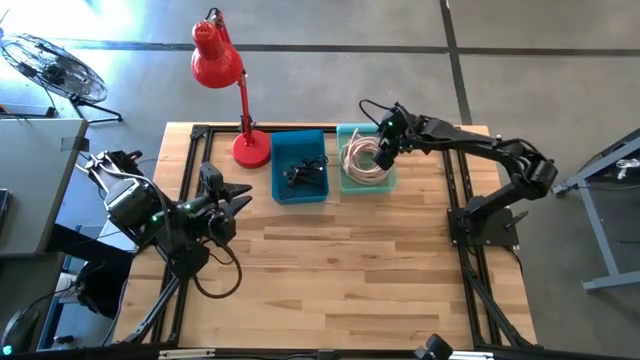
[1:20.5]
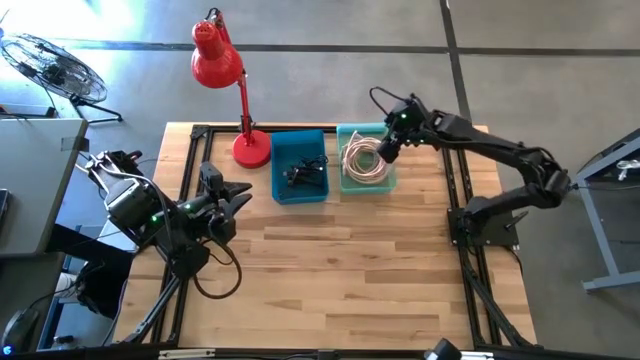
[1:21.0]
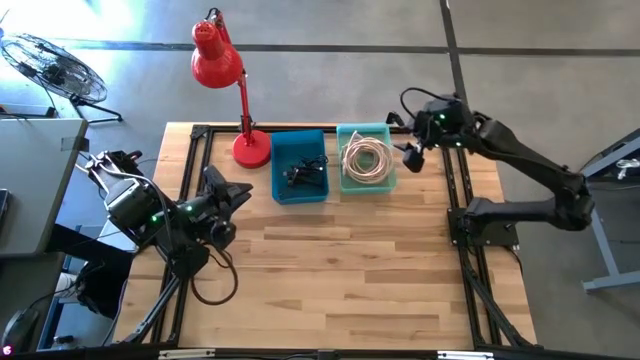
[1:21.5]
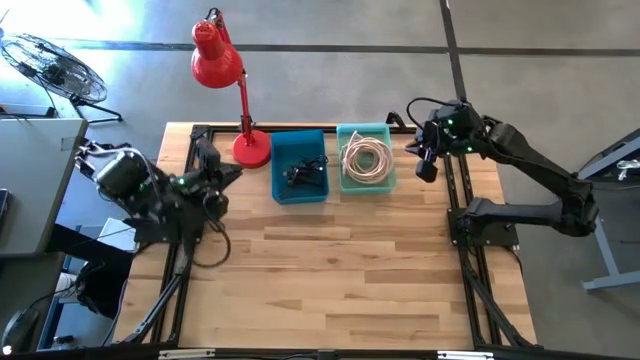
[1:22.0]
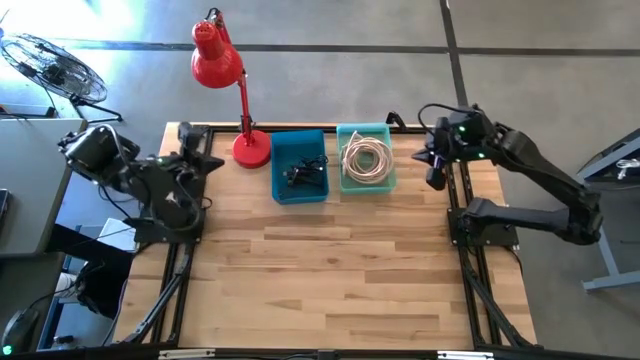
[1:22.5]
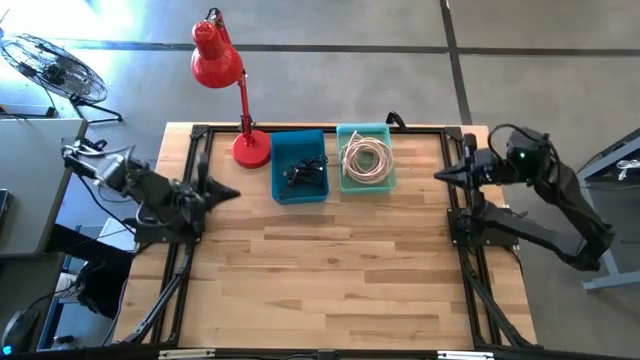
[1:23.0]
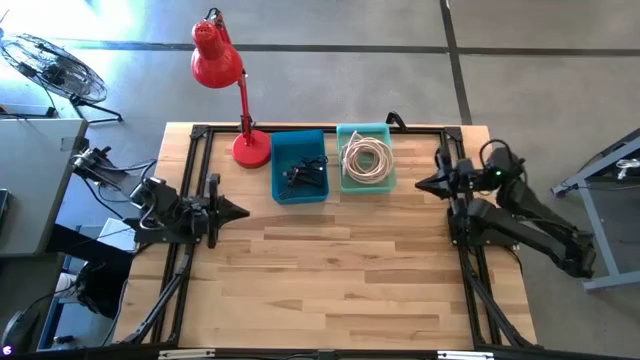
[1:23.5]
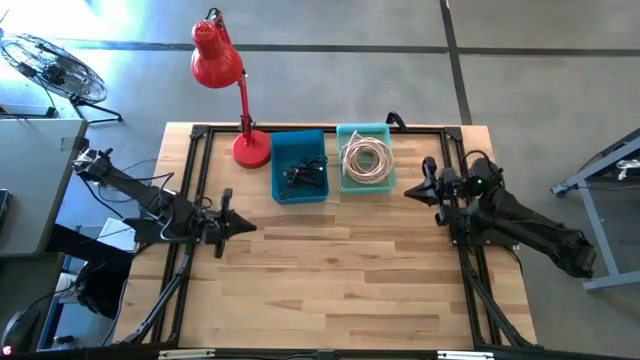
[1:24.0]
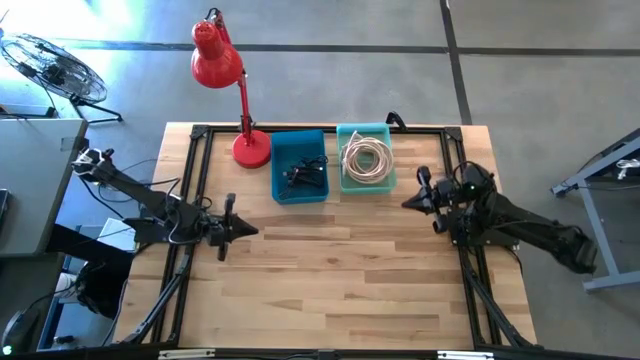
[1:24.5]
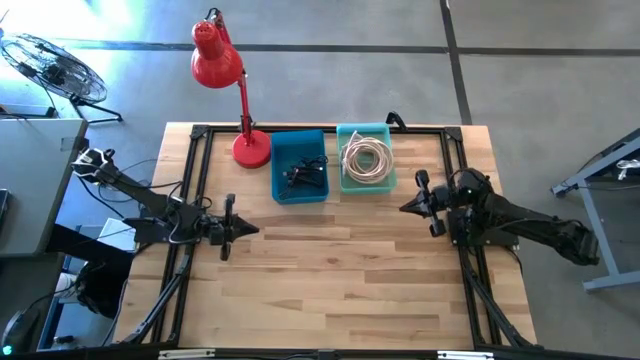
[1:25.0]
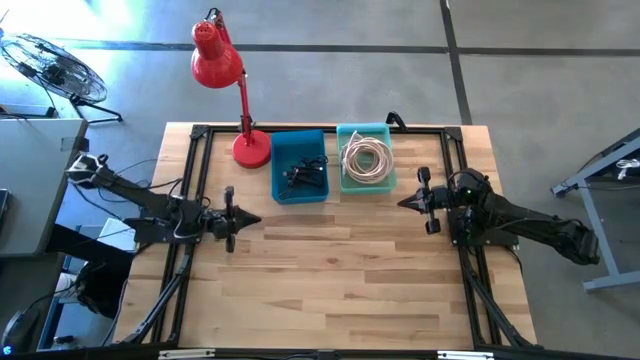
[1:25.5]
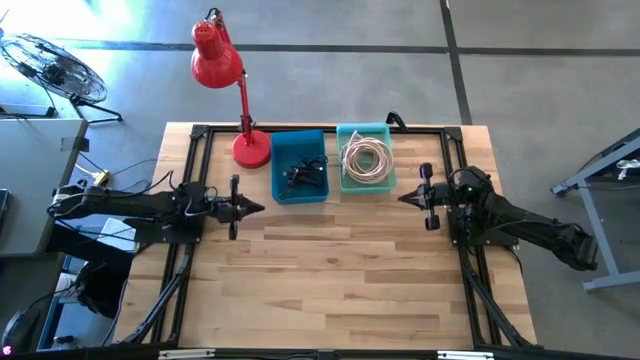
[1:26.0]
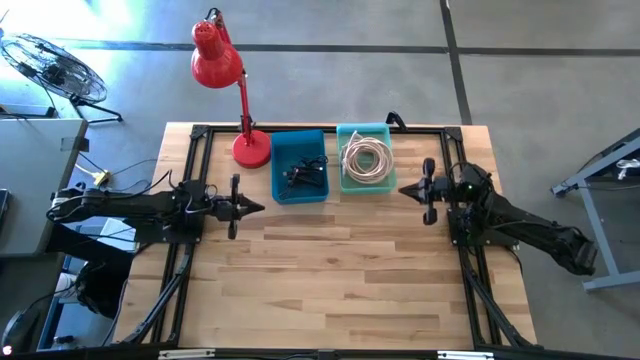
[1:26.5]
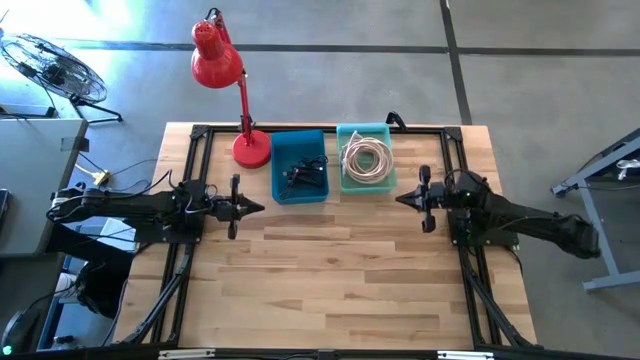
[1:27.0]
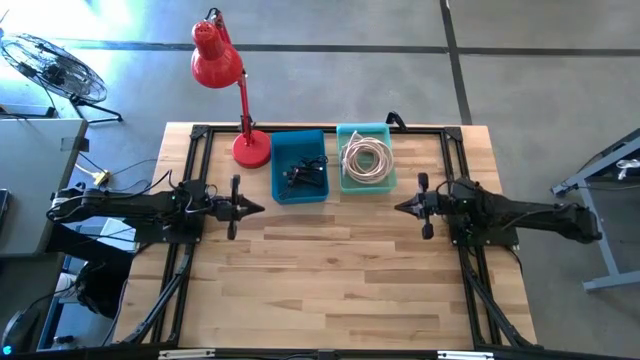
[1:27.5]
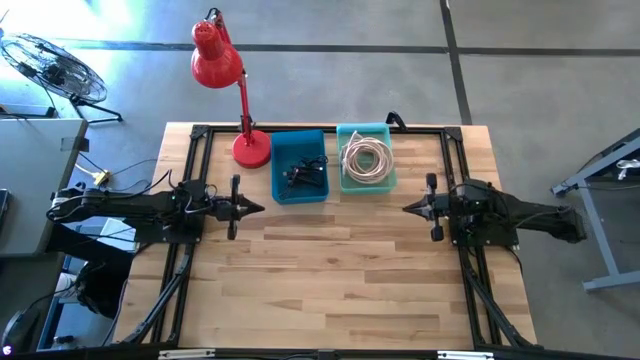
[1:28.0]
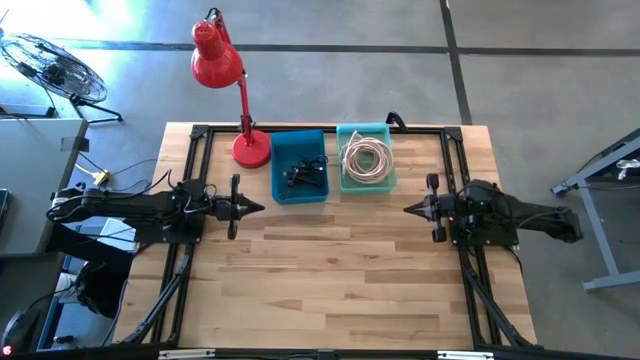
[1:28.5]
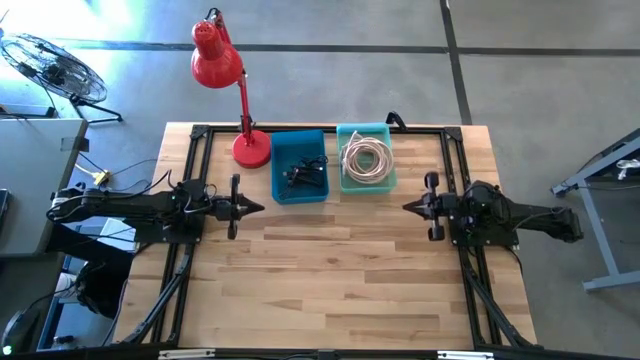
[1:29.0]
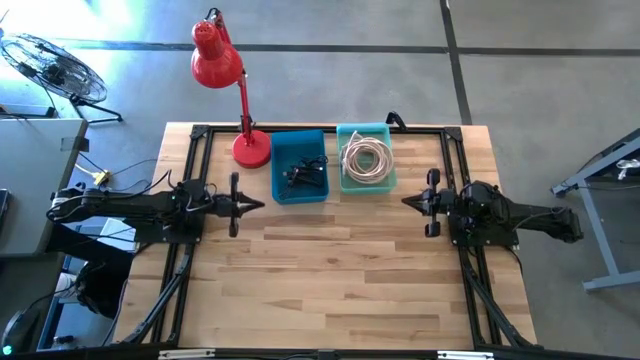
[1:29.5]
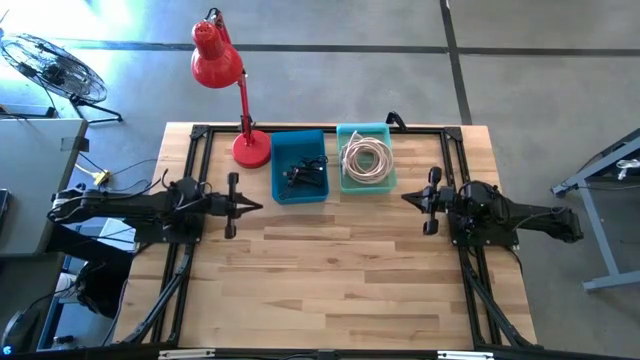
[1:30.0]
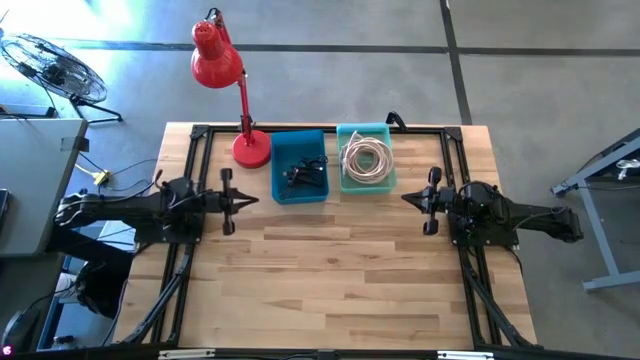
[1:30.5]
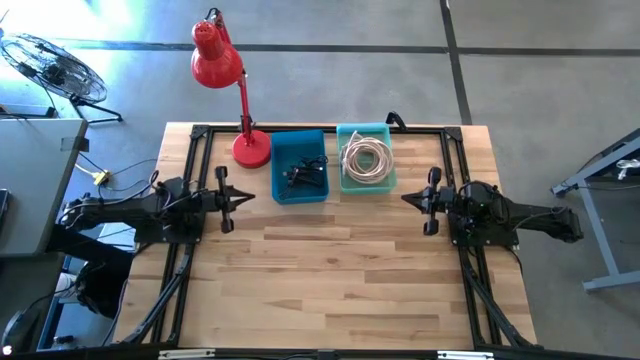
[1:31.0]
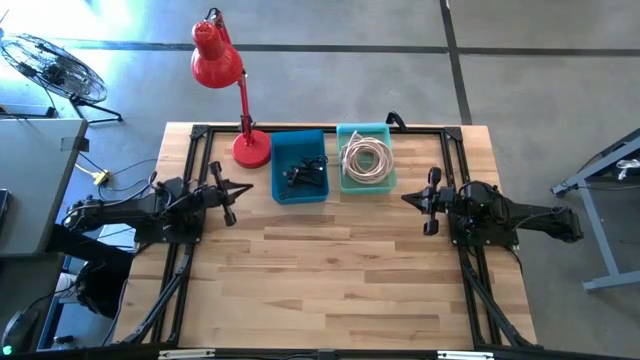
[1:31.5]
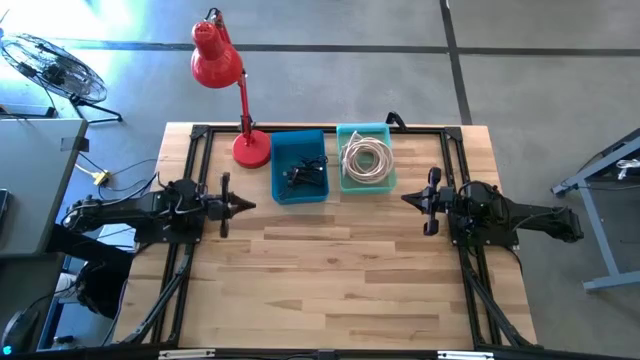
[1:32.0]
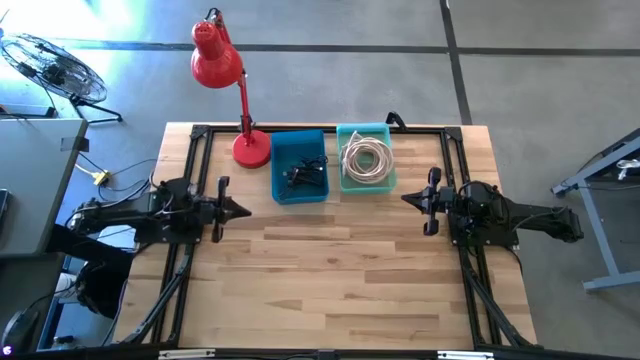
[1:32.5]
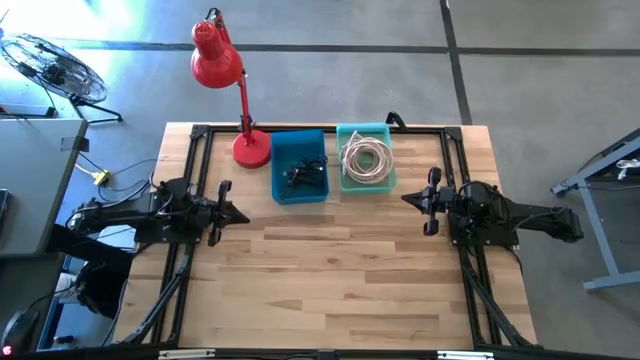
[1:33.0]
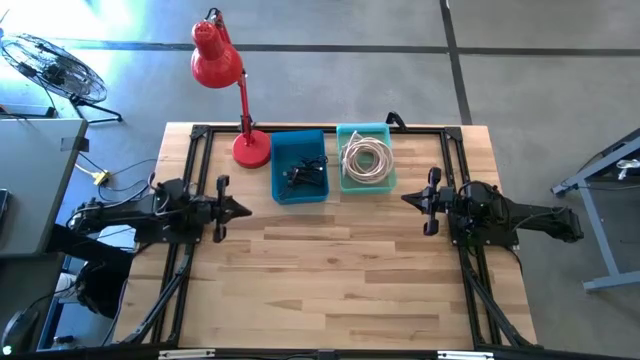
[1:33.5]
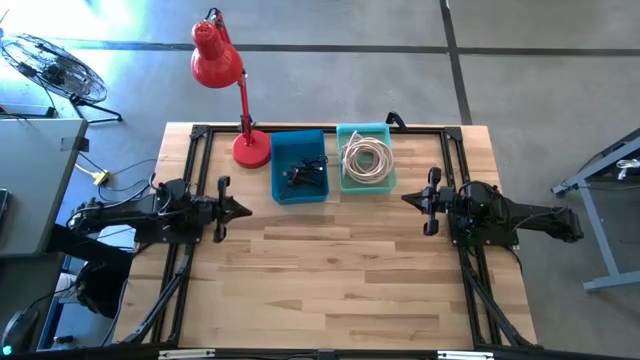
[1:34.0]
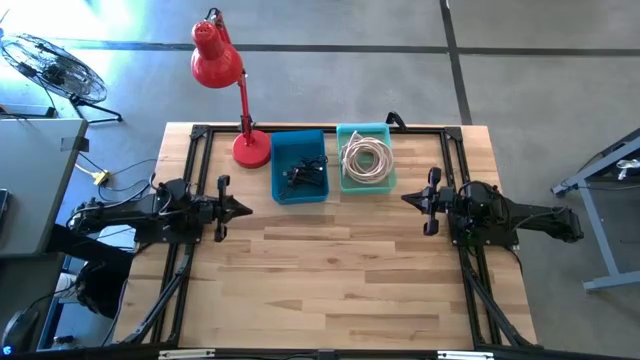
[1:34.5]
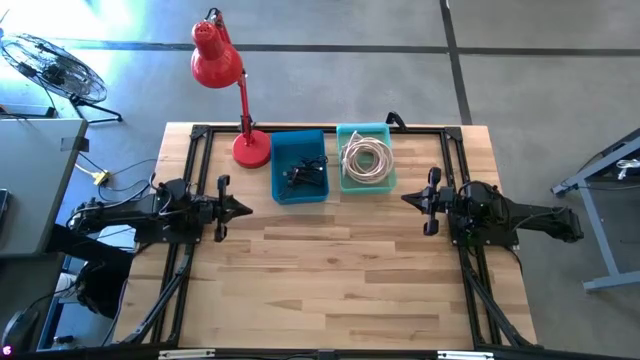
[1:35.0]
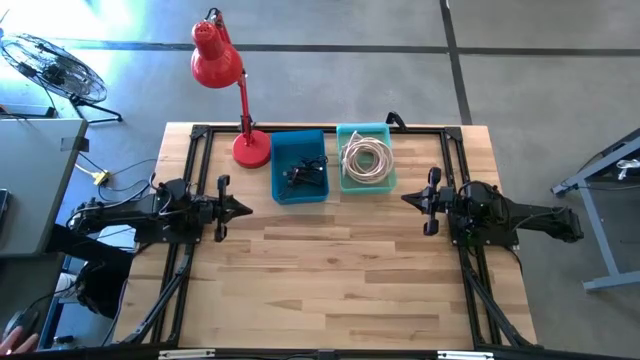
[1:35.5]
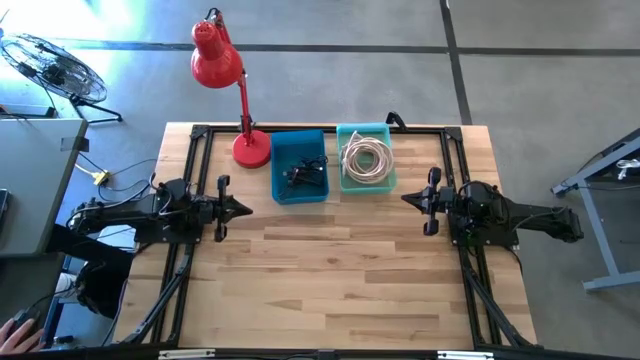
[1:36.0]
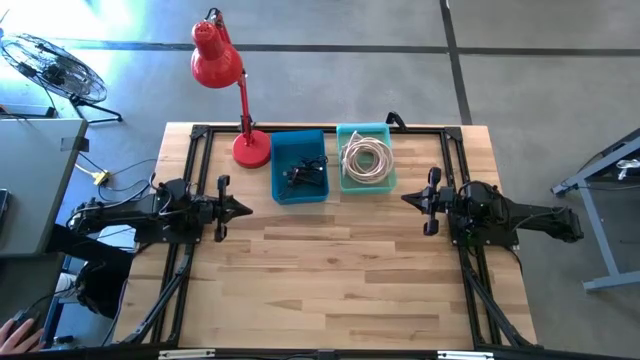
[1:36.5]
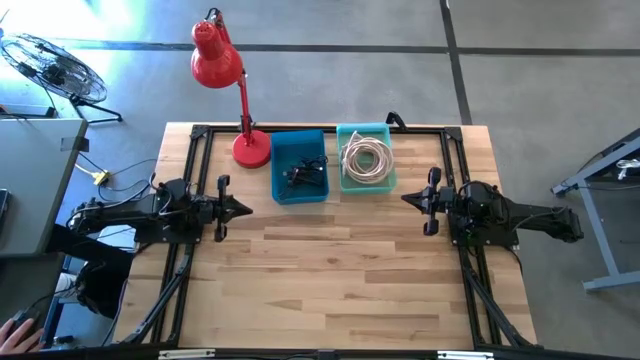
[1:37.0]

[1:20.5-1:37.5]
Task: Pick & Place USB Port
Return to Home Position

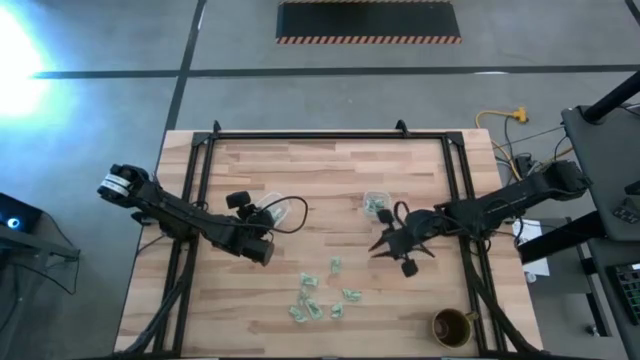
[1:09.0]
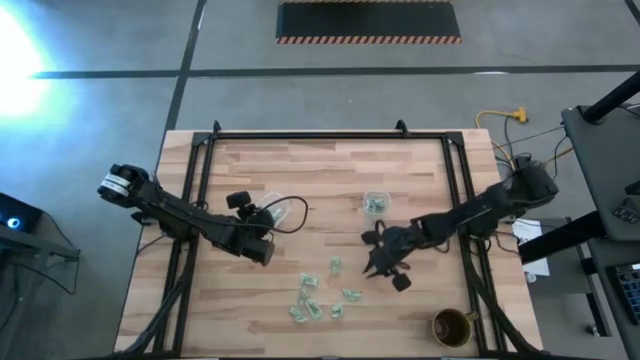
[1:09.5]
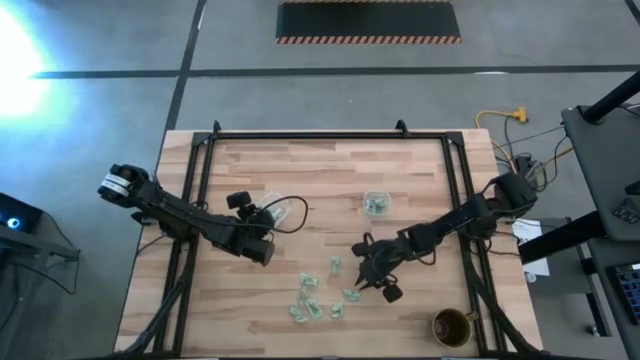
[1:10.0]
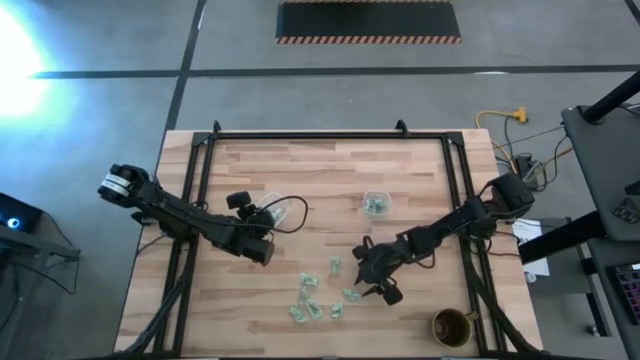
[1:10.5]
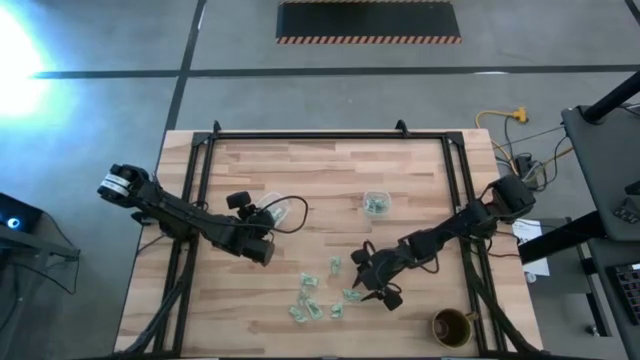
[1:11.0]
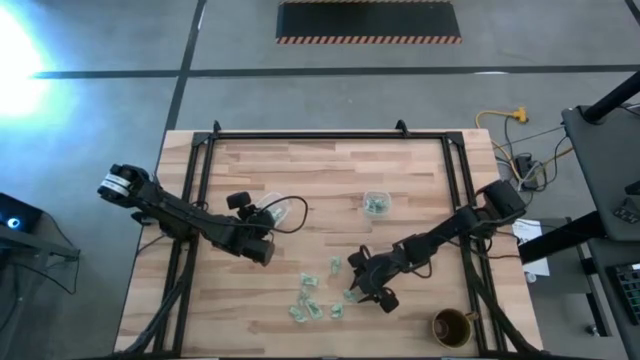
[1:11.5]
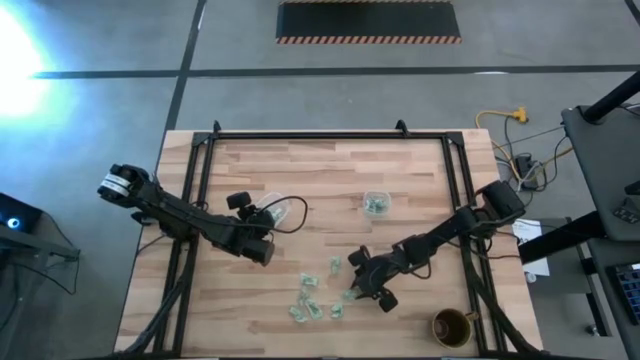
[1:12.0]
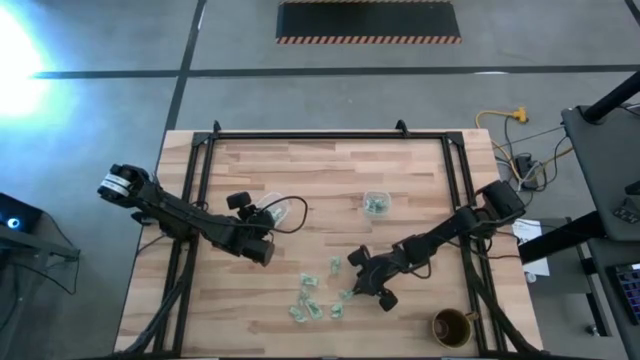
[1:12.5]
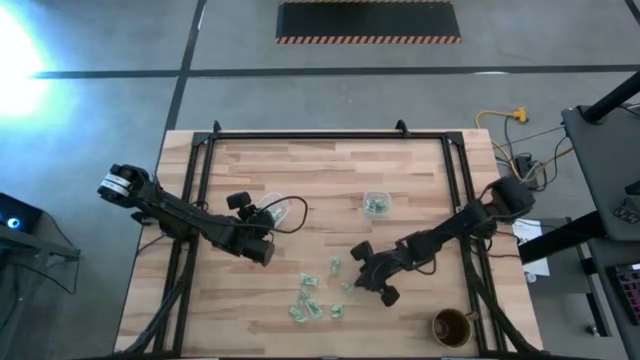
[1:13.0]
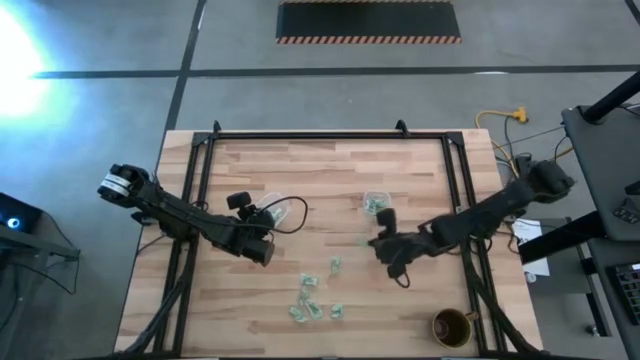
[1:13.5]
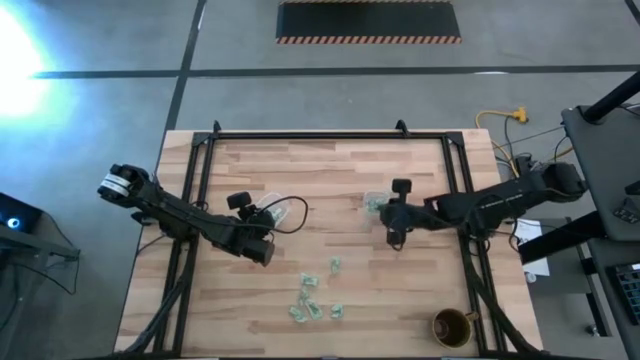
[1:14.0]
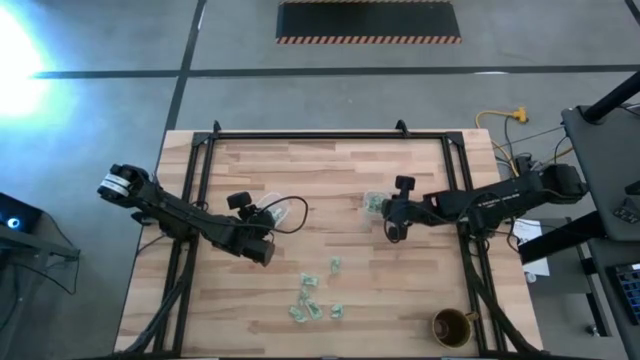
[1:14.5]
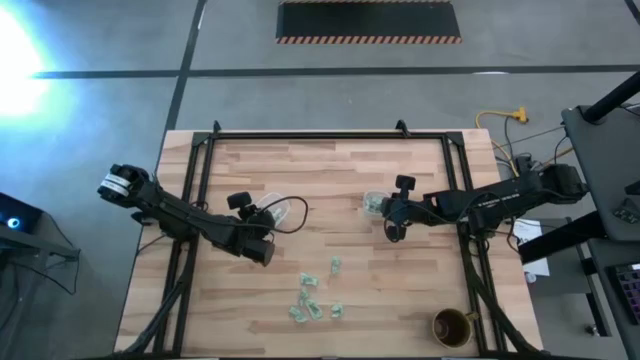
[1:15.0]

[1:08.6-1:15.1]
Task: Pick and place Stevia / Truvia into bins
Put the light green stevia packet into the right transparent container
